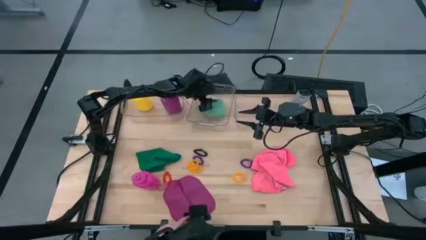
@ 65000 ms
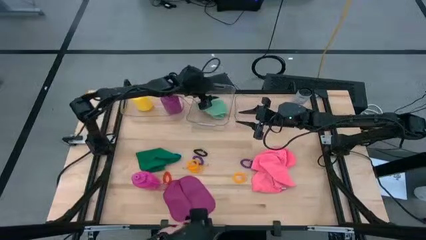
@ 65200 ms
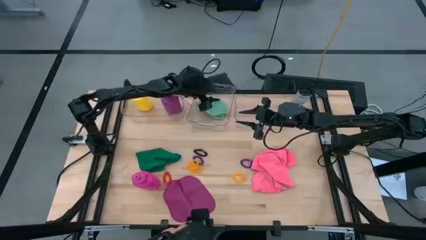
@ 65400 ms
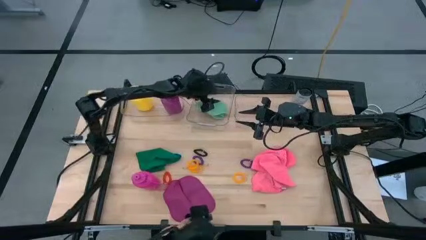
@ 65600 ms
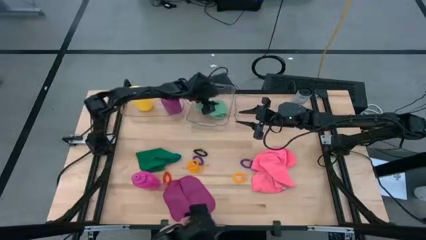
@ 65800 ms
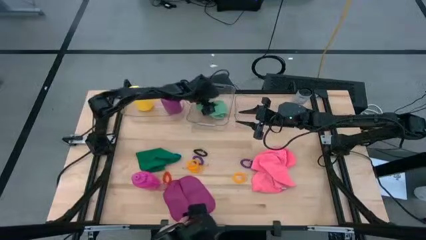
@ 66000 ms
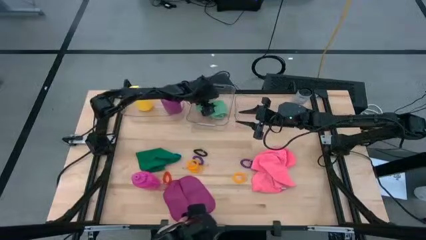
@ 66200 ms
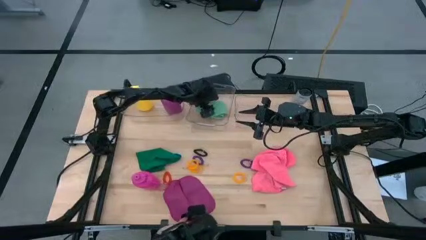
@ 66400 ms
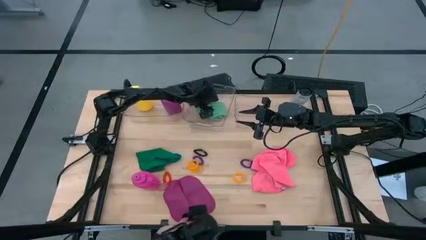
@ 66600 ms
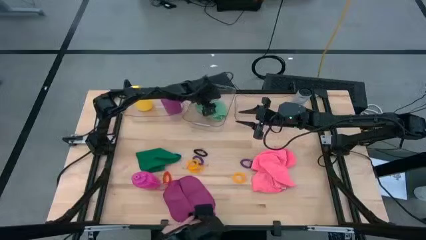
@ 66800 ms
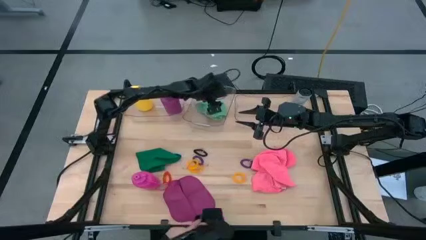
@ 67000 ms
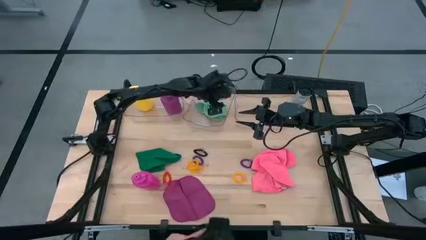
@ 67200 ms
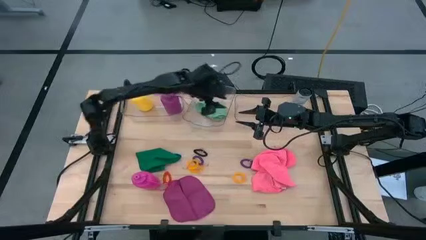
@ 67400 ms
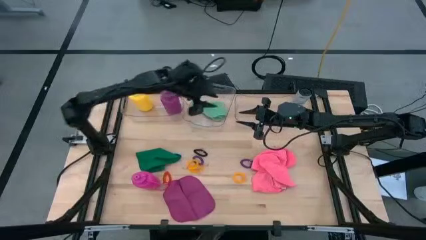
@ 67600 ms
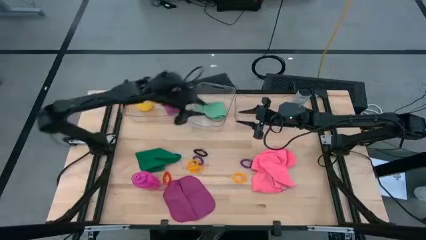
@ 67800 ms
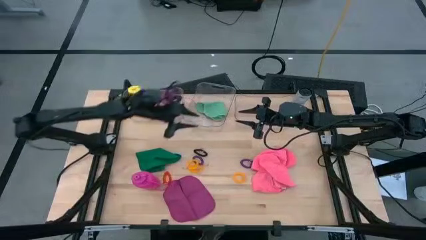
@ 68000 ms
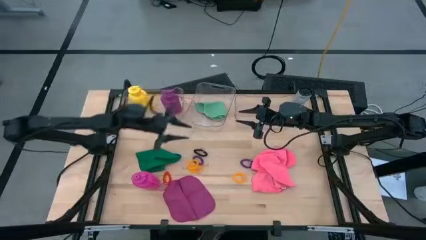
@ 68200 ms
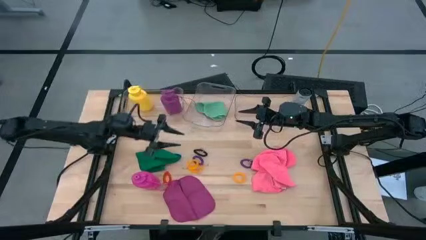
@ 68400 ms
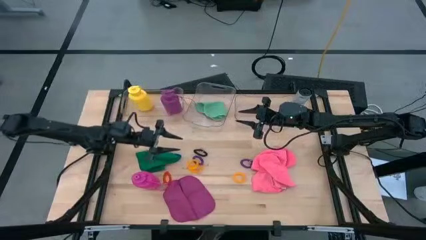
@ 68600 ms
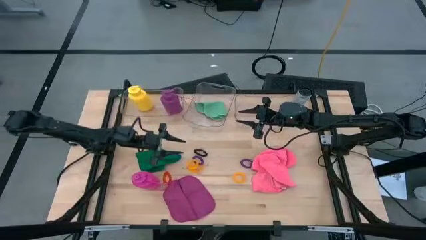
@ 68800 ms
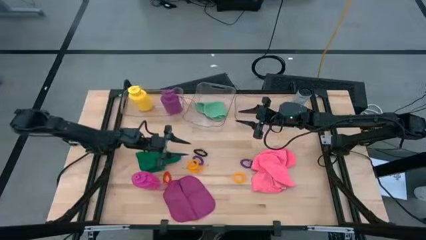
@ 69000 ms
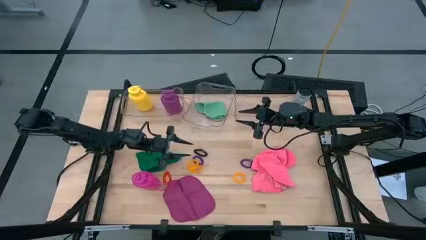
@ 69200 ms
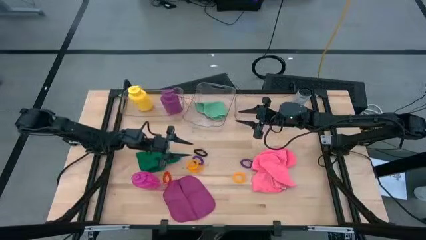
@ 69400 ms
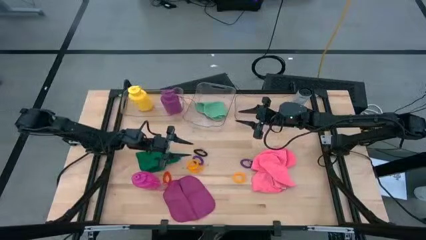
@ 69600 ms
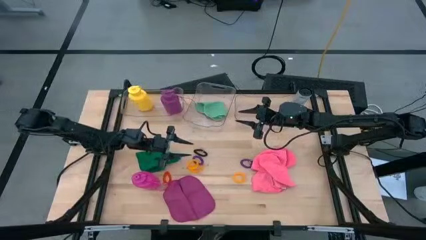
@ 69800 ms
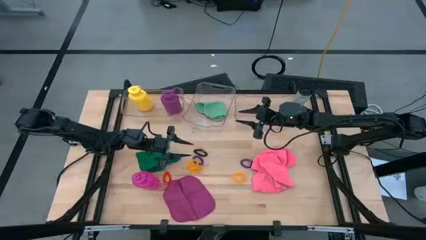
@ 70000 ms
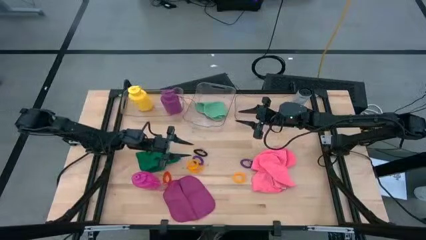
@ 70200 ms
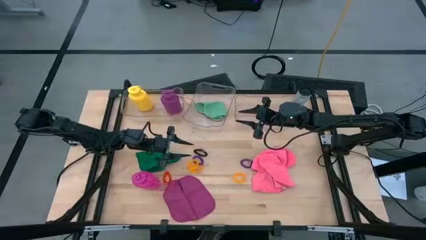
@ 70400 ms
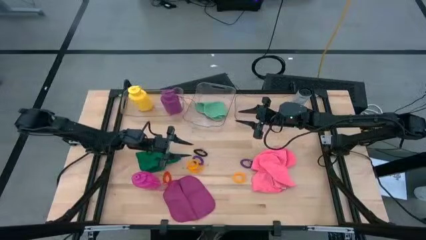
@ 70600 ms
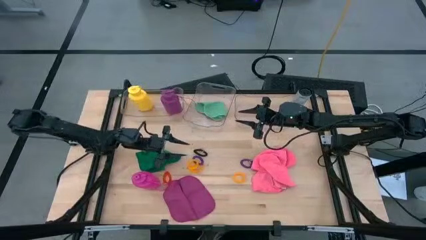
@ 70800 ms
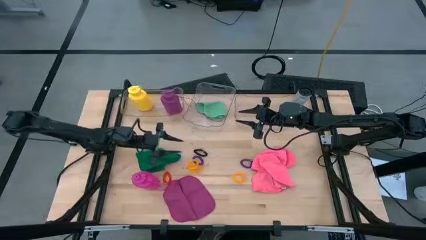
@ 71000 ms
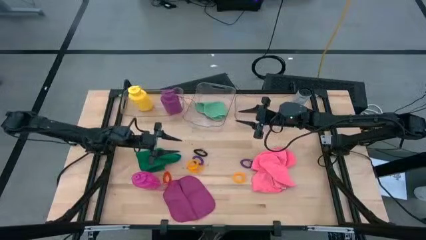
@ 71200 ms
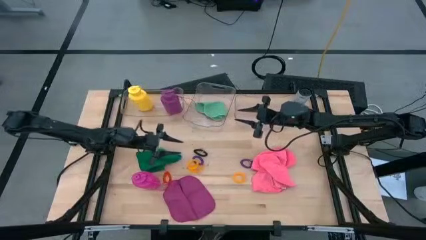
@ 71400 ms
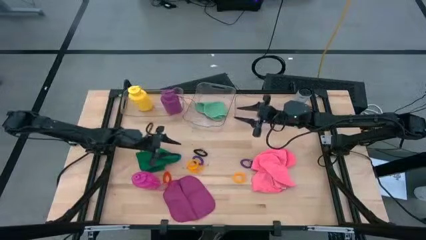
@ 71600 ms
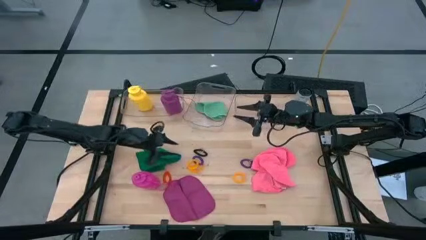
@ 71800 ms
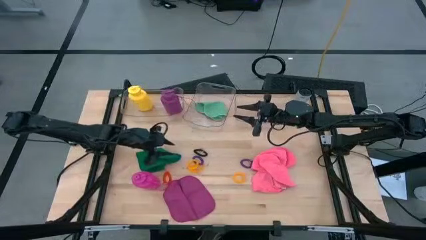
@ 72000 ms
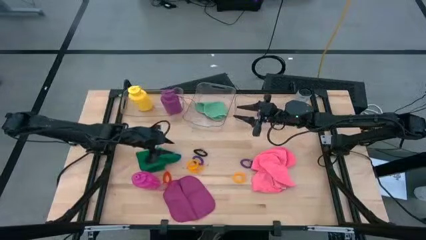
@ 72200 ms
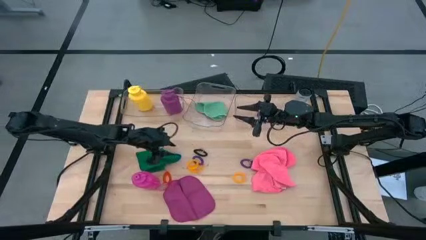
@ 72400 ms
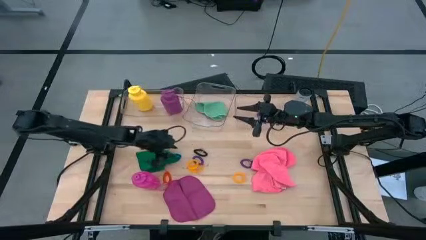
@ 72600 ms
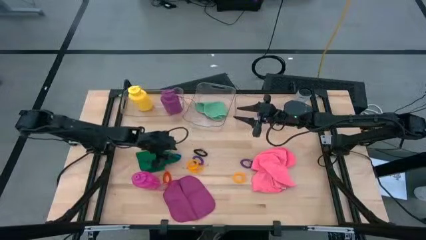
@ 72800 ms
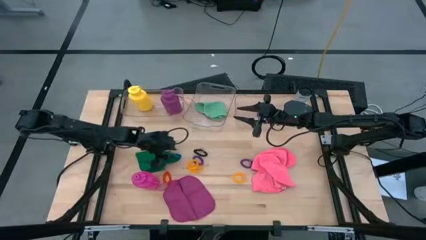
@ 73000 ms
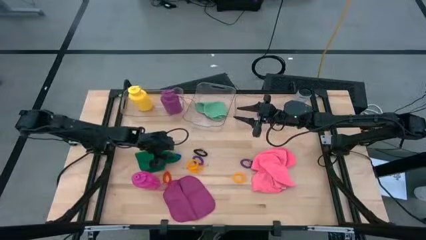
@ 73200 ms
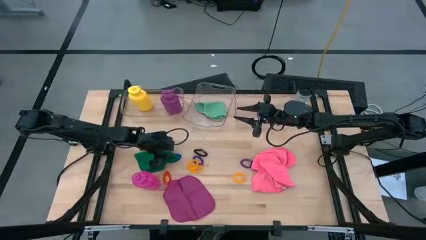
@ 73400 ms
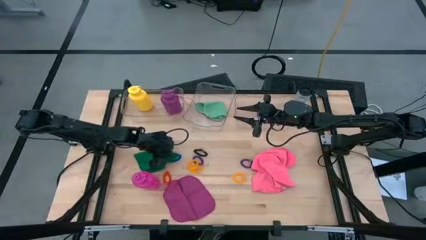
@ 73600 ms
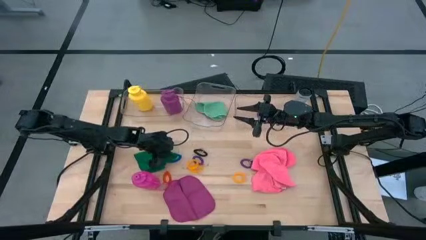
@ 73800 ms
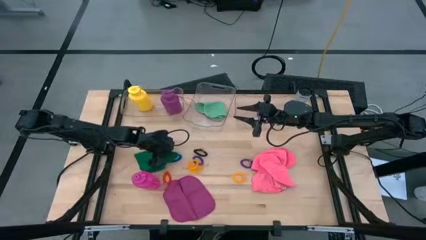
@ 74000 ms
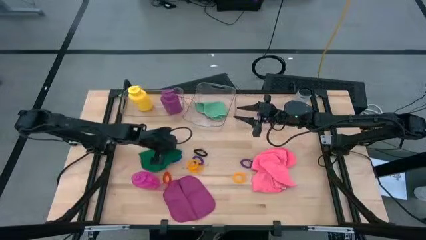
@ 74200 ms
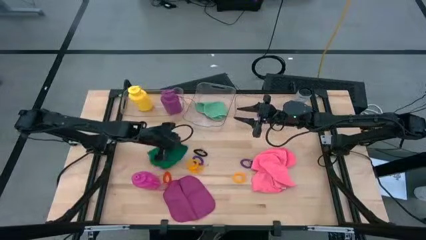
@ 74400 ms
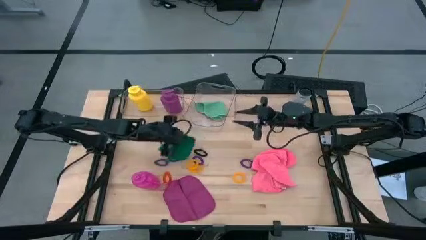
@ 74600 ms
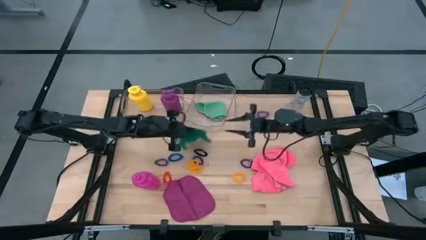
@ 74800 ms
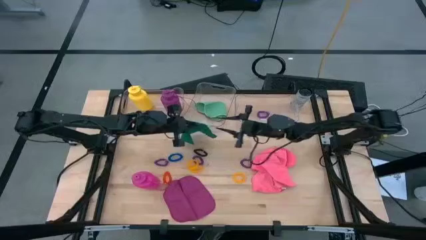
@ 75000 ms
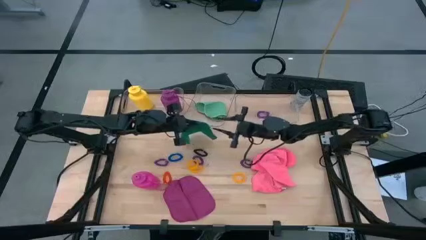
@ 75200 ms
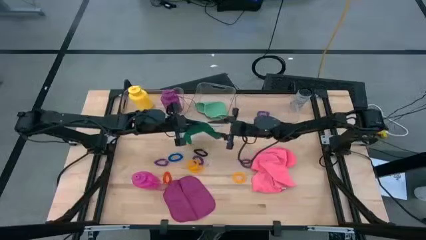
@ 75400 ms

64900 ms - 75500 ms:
Task: Pick & Place Sports Items
Put the green microfiber towel into the middle transparent bin

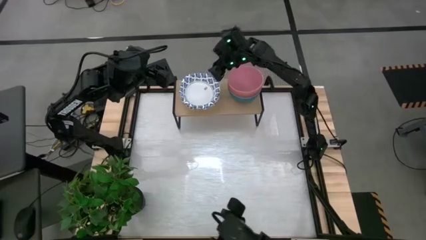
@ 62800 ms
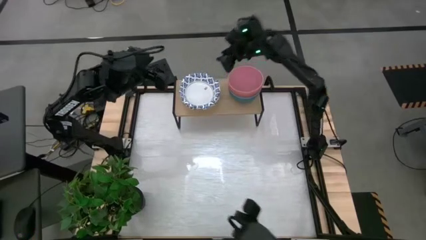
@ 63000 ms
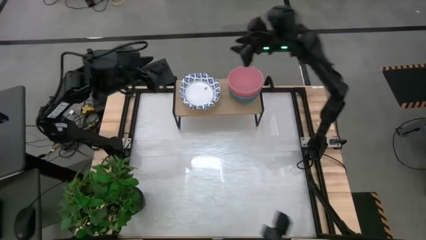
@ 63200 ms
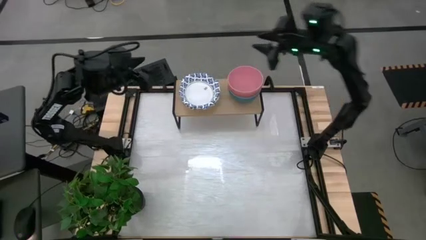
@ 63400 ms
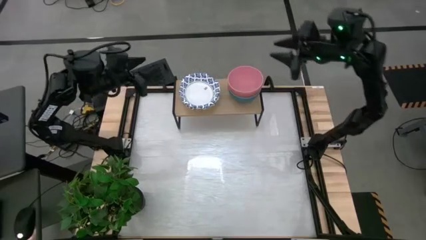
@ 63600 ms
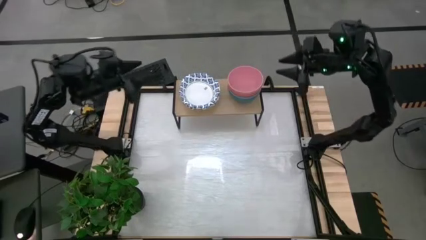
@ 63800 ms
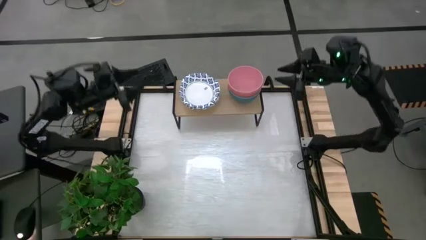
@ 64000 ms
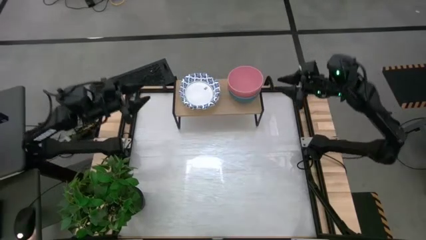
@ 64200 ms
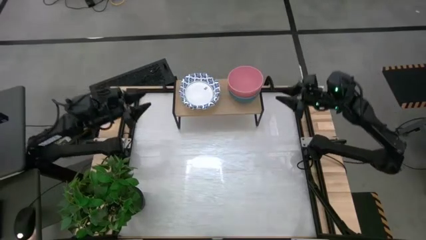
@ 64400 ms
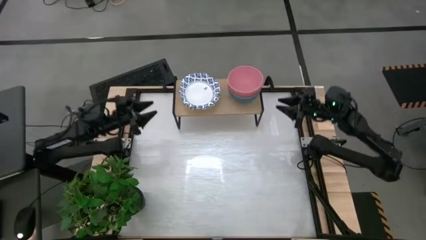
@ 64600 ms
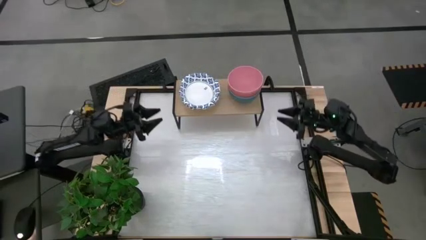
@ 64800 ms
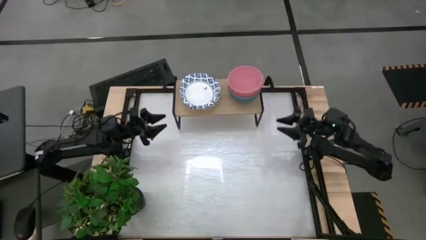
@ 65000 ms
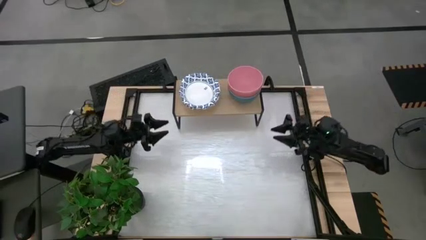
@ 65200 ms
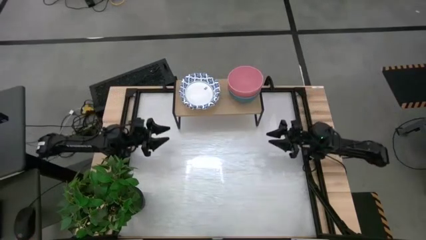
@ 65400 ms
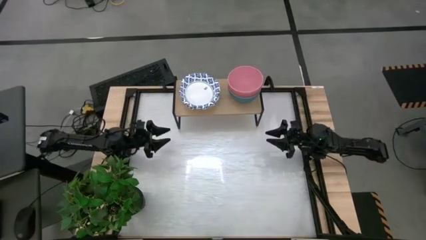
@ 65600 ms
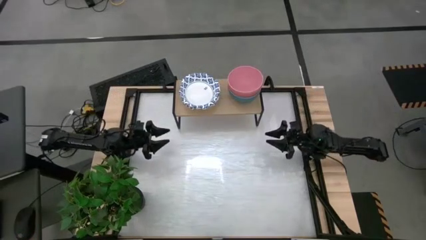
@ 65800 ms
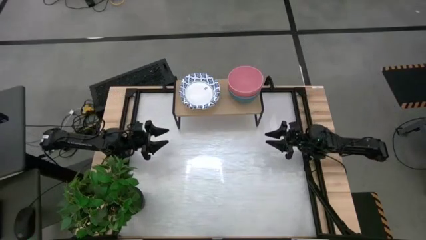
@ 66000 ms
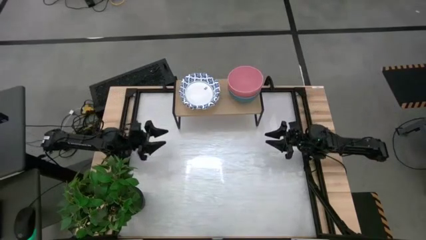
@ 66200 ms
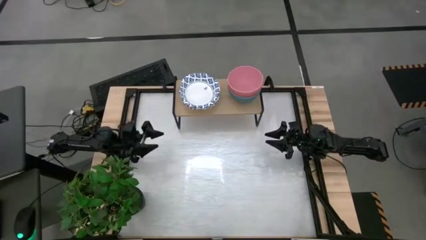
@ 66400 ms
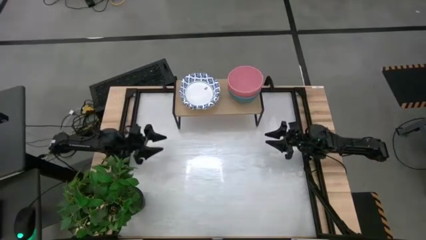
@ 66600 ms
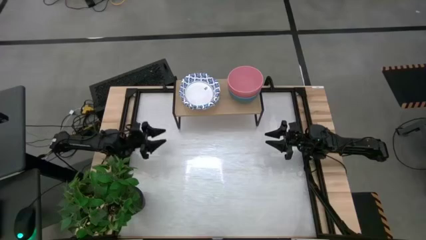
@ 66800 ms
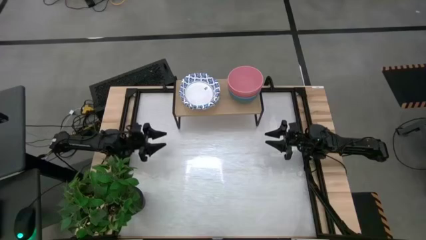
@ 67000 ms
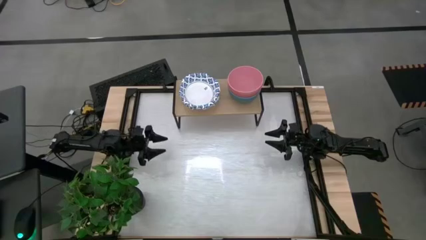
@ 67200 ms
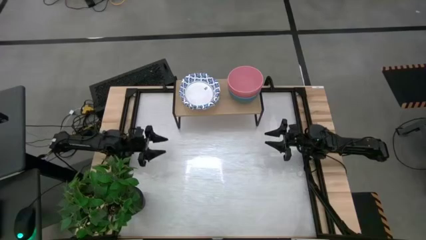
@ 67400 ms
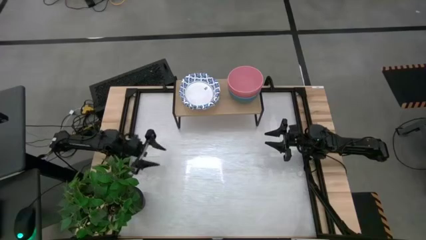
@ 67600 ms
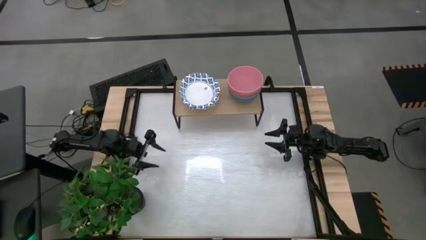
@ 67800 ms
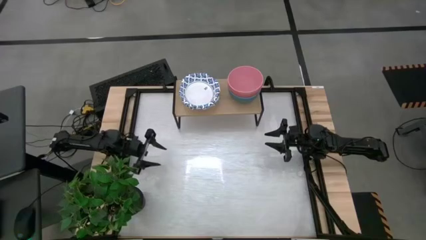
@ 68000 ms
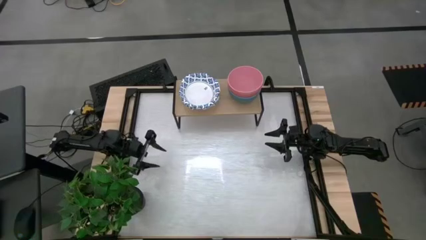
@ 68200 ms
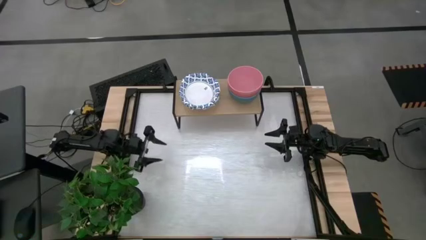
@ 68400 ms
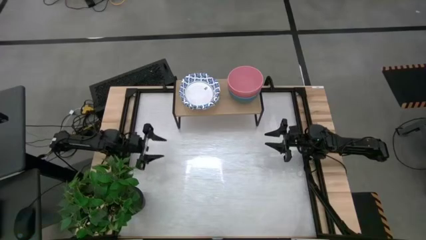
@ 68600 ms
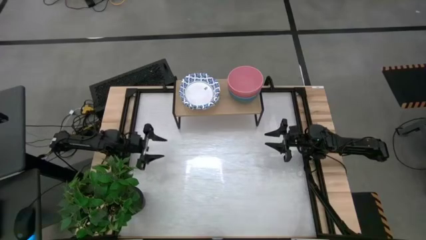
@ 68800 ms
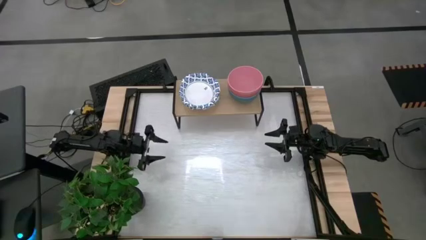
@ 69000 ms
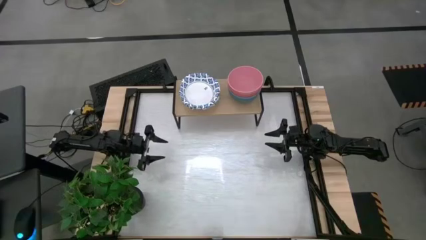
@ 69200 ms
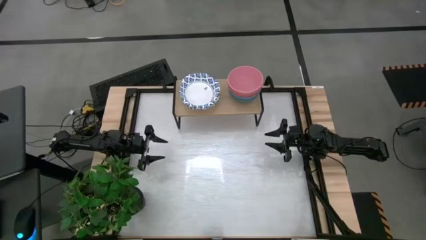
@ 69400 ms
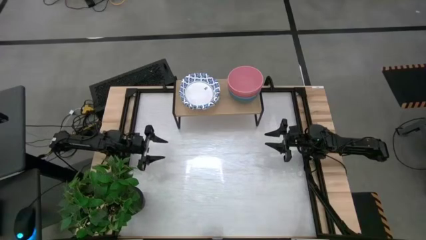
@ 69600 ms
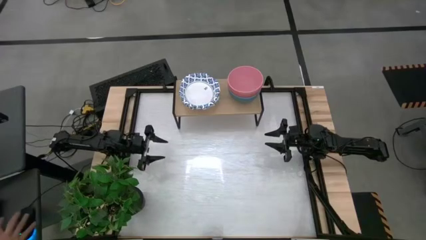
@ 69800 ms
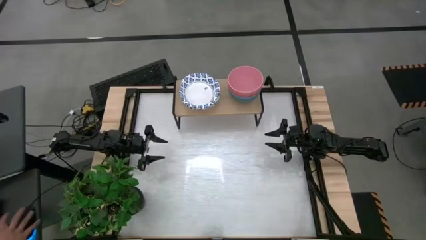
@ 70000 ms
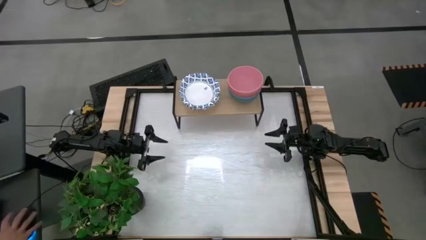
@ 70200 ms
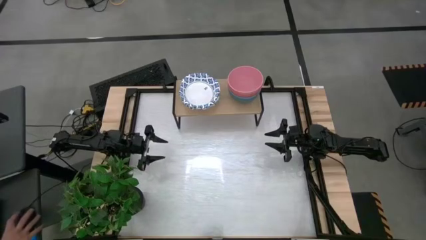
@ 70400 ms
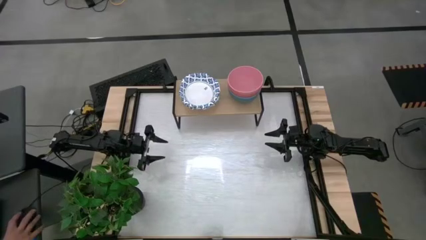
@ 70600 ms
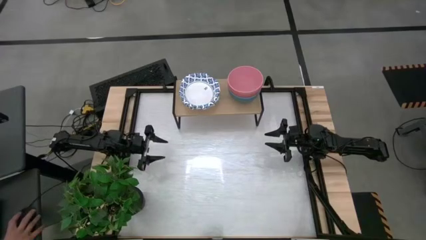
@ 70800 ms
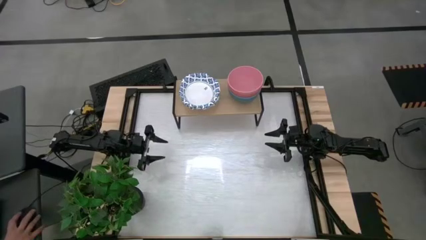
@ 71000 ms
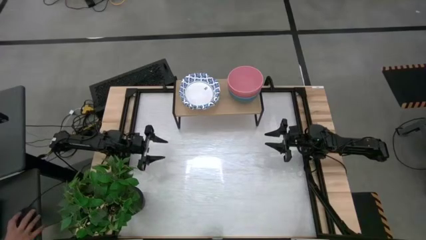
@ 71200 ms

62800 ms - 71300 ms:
Task: Place and stack bowls onto a shelf
Return to Home Position
